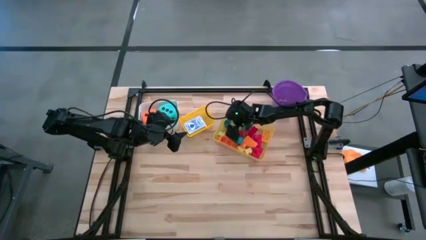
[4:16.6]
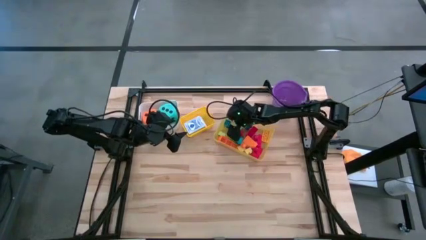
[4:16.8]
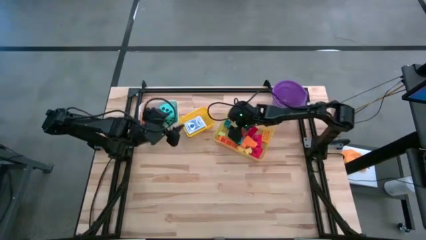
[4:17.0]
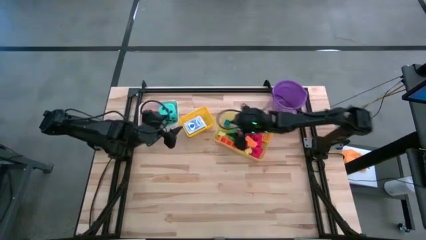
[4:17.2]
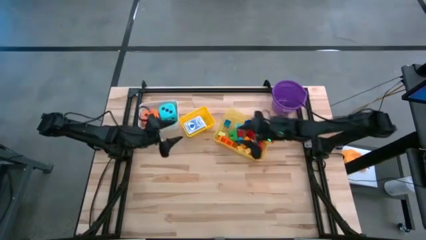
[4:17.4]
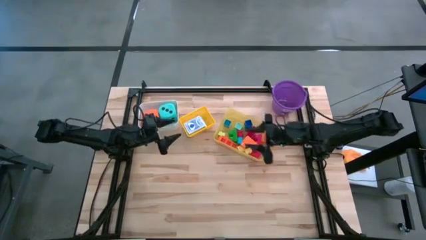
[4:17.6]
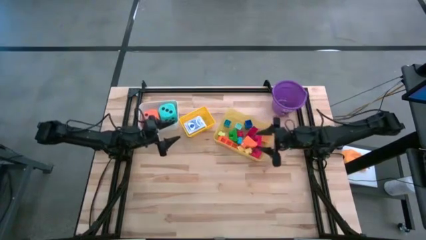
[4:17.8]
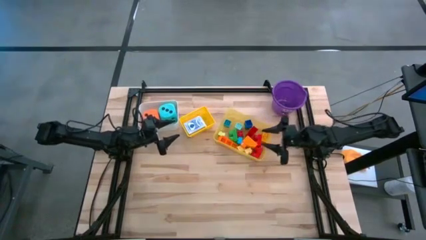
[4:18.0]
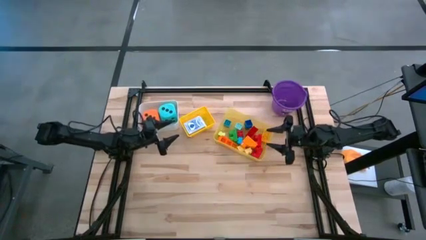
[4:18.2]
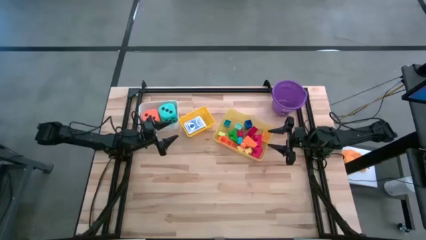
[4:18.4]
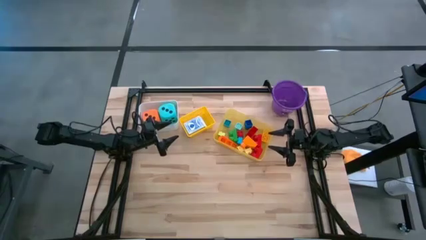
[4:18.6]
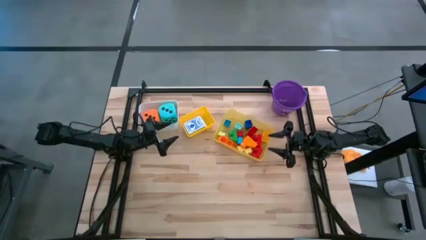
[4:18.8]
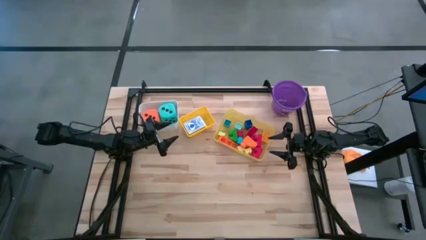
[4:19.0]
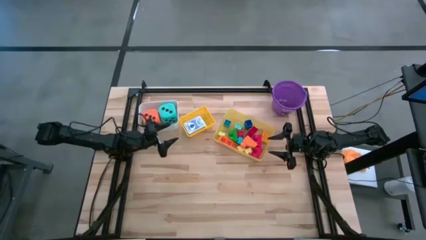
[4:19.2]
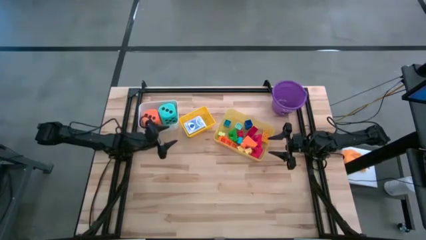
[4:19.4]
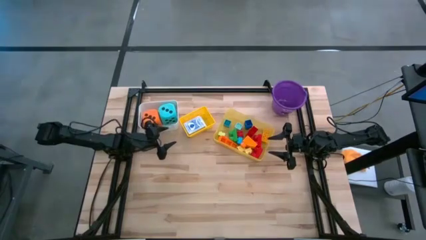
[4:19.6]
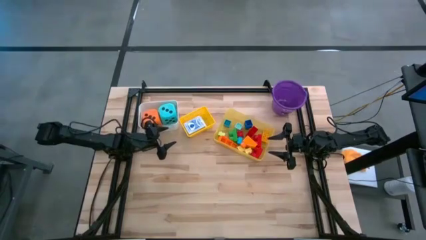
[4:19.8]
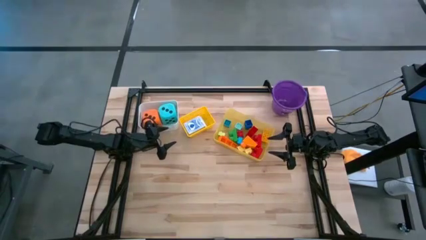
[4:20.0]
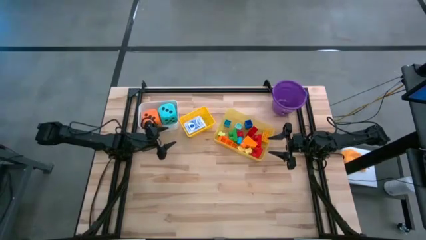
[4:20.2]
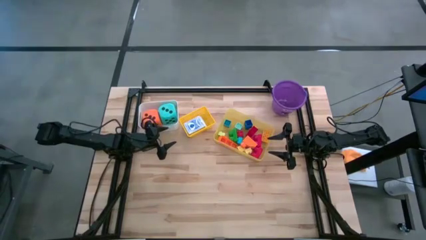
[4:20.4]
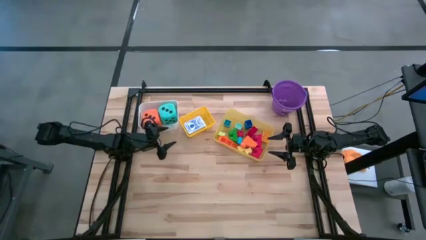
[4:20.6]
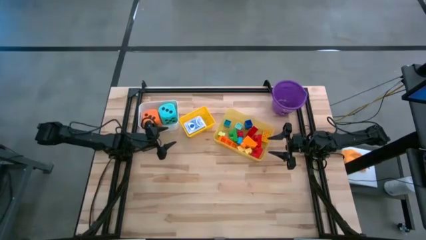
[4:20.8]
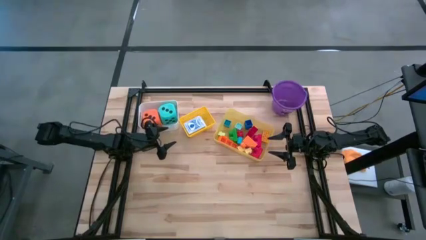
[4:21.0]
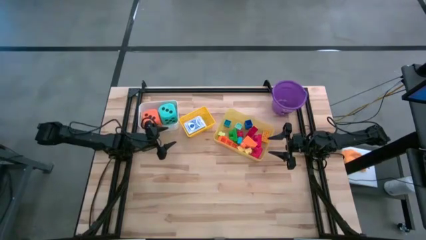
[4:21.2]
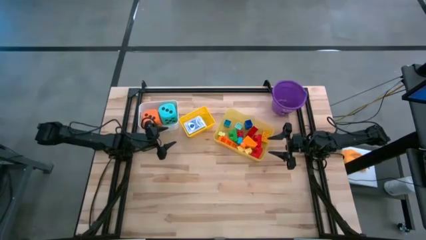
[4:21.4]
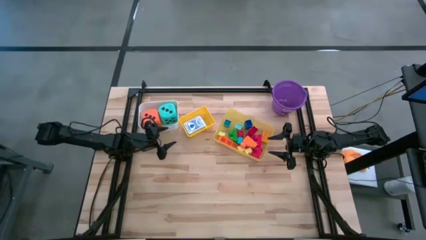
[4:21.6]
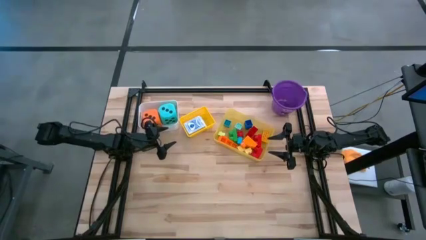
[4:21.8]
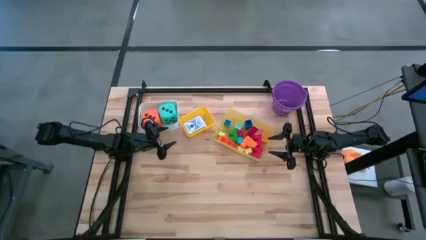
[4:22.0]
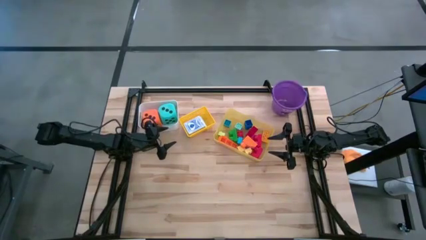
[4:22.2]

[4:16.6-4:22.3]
Task: Pick & Place Toys
Return to Home Position

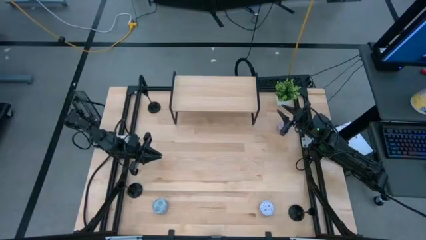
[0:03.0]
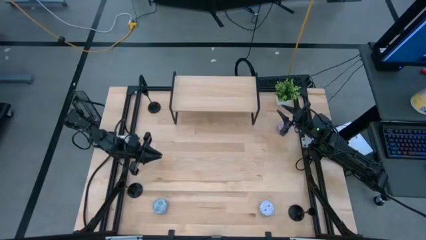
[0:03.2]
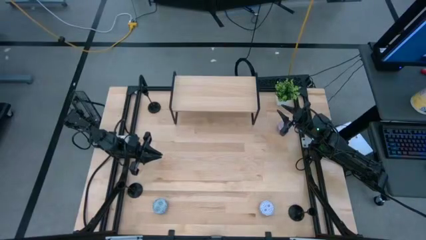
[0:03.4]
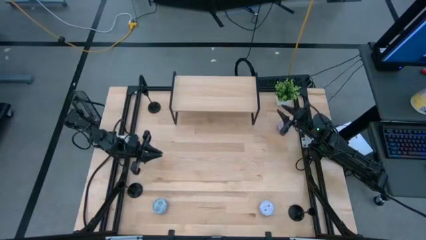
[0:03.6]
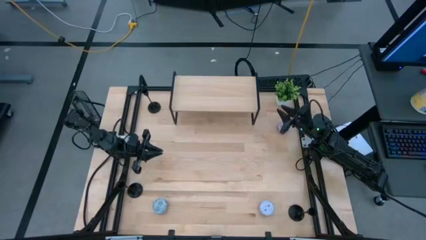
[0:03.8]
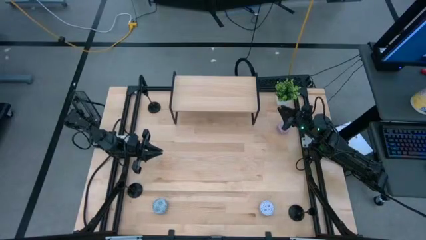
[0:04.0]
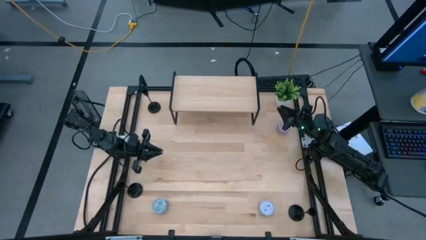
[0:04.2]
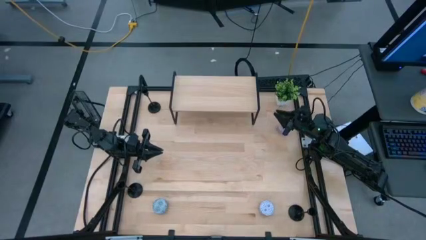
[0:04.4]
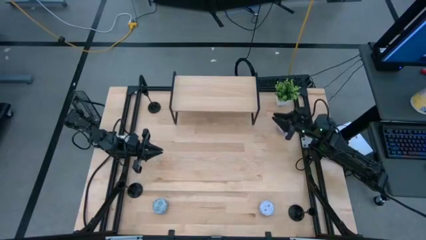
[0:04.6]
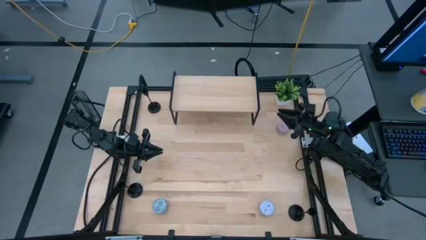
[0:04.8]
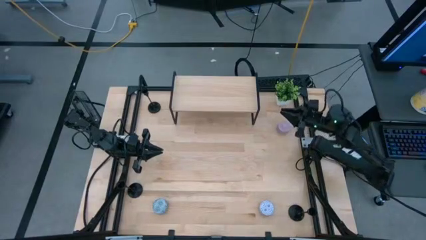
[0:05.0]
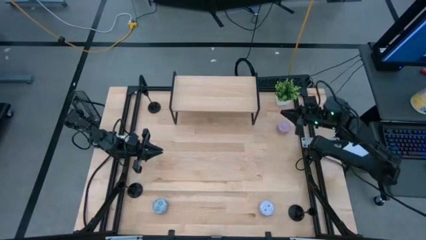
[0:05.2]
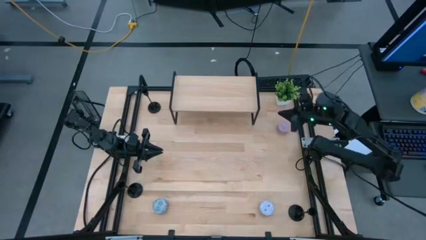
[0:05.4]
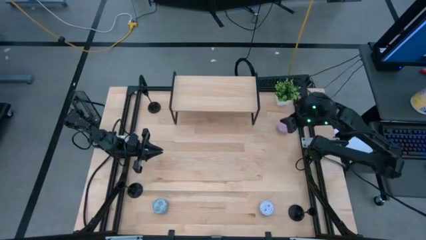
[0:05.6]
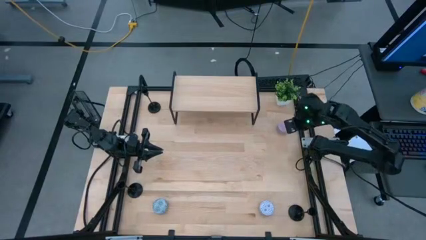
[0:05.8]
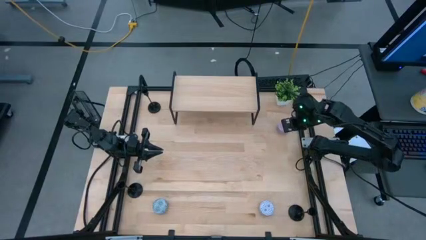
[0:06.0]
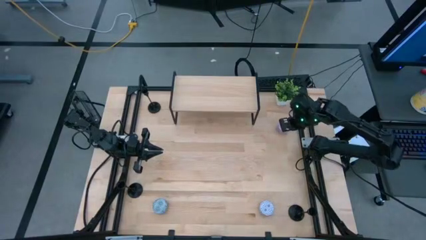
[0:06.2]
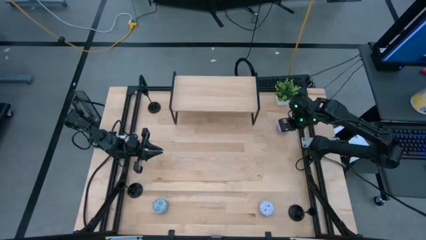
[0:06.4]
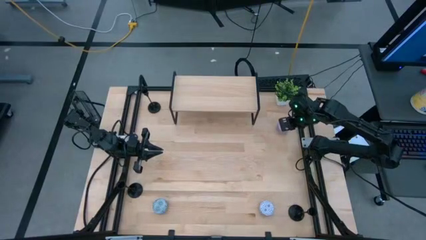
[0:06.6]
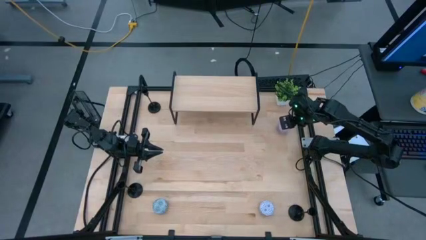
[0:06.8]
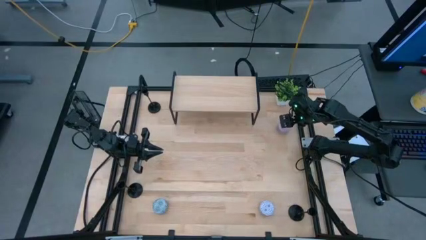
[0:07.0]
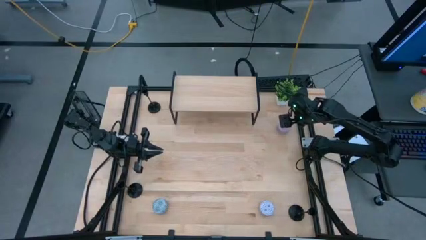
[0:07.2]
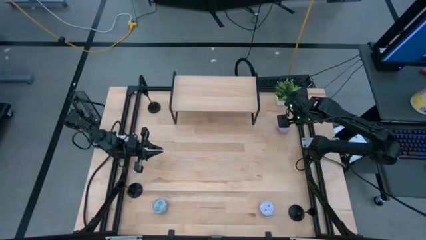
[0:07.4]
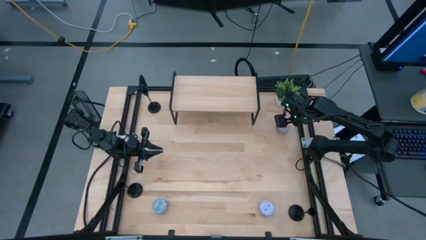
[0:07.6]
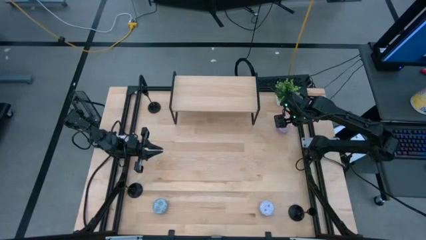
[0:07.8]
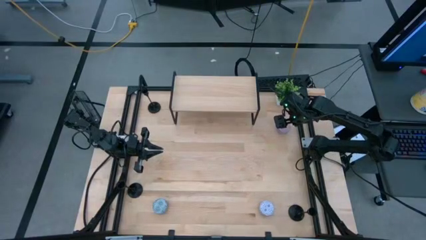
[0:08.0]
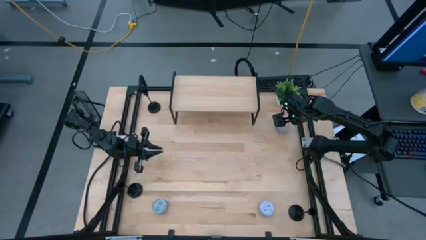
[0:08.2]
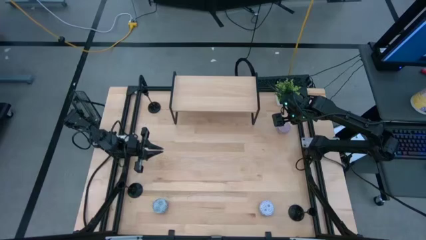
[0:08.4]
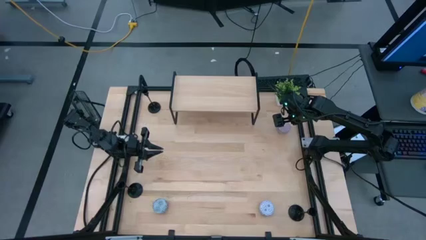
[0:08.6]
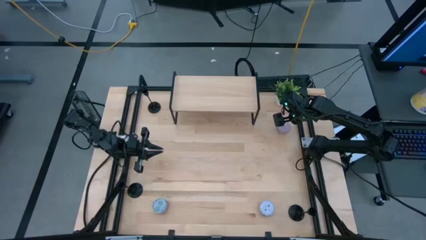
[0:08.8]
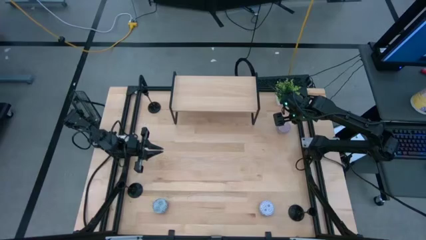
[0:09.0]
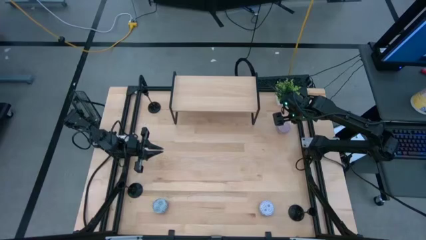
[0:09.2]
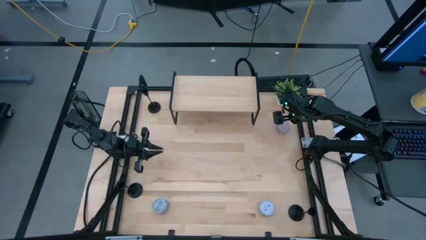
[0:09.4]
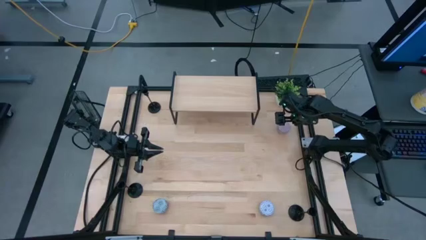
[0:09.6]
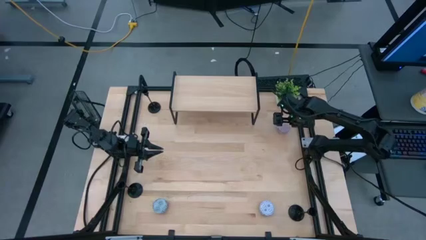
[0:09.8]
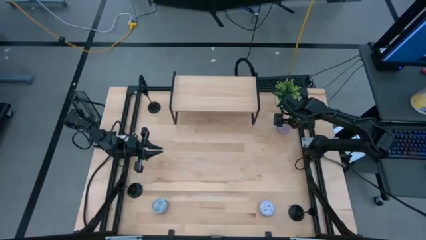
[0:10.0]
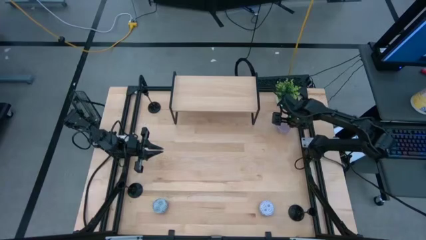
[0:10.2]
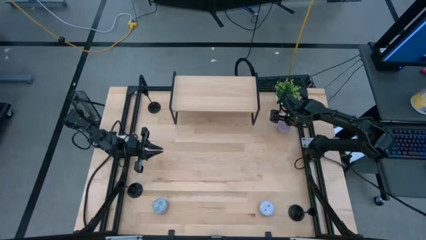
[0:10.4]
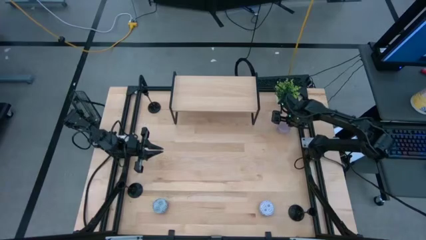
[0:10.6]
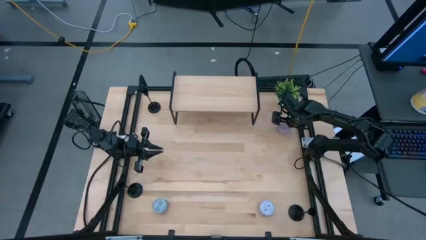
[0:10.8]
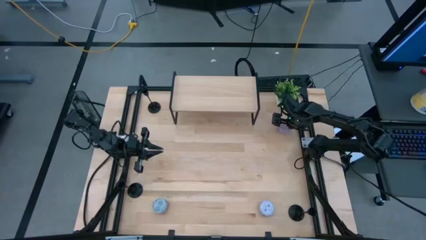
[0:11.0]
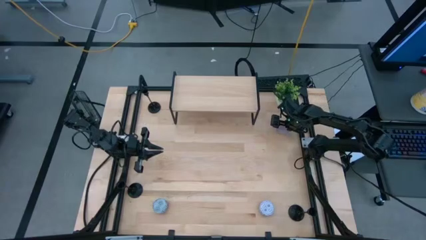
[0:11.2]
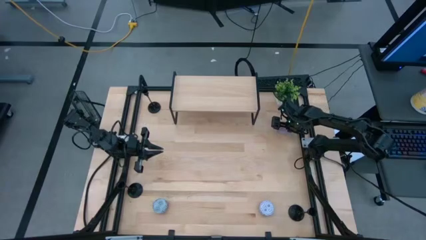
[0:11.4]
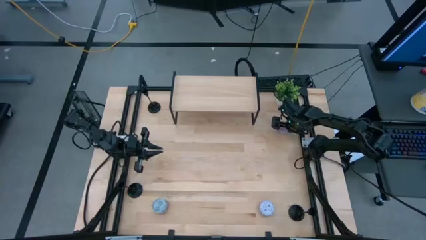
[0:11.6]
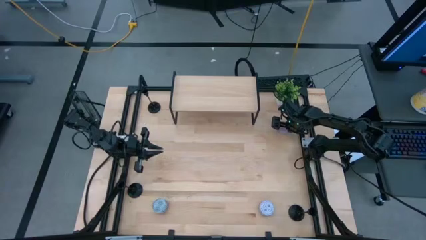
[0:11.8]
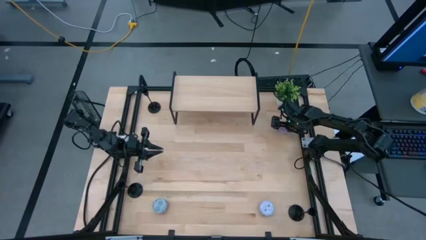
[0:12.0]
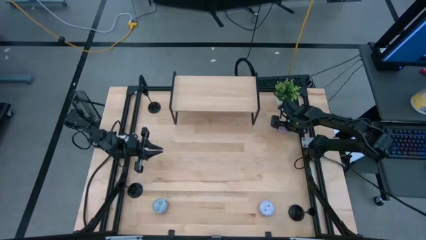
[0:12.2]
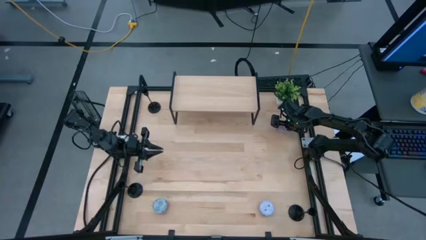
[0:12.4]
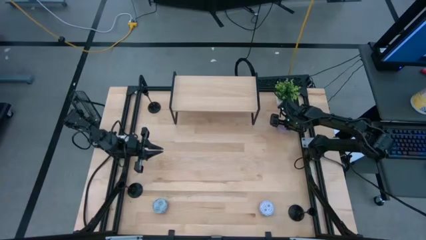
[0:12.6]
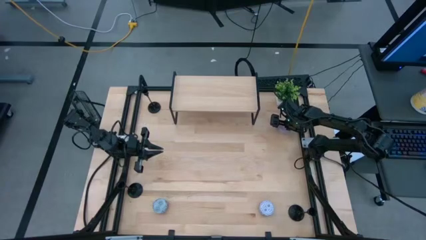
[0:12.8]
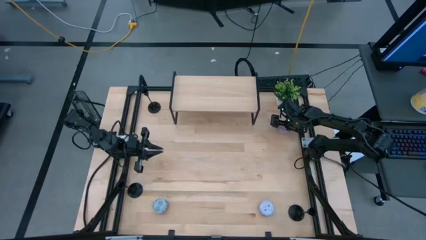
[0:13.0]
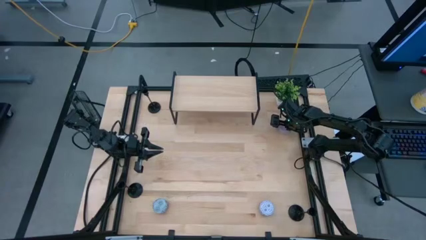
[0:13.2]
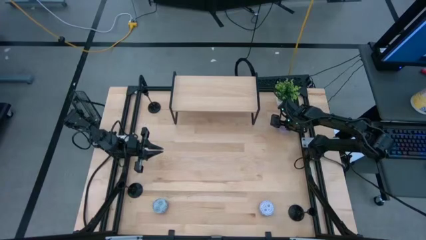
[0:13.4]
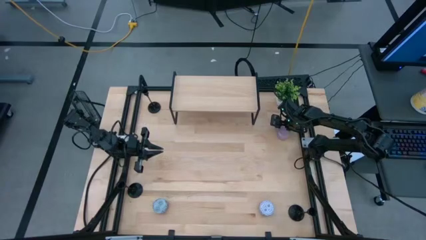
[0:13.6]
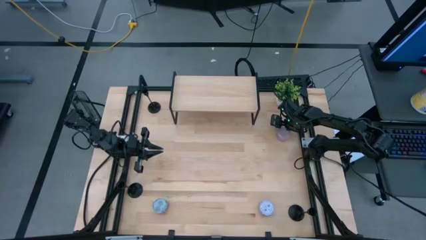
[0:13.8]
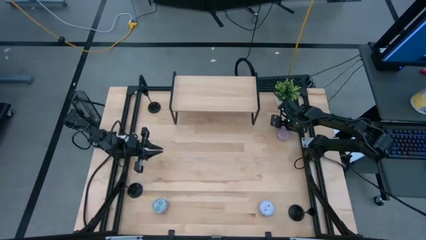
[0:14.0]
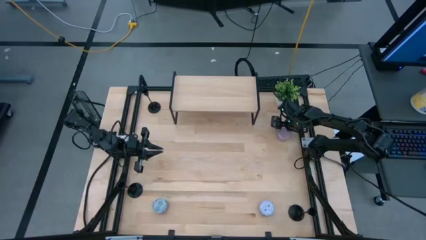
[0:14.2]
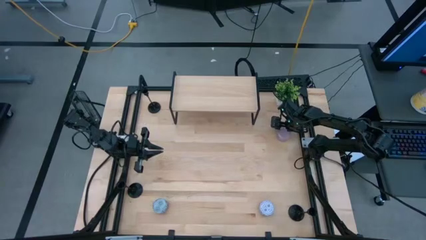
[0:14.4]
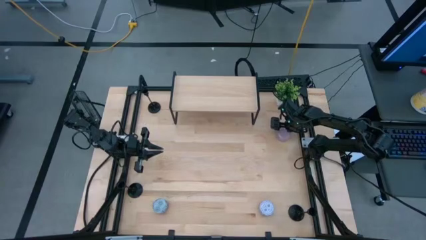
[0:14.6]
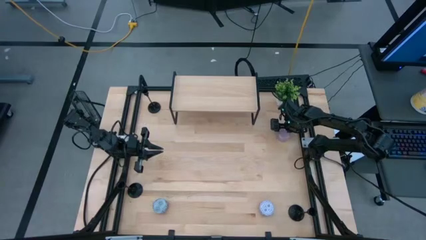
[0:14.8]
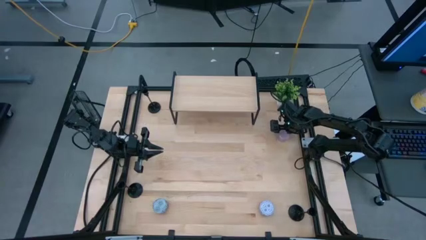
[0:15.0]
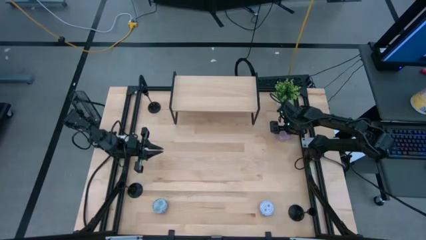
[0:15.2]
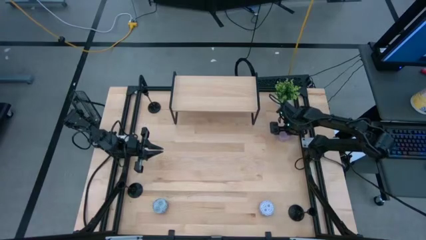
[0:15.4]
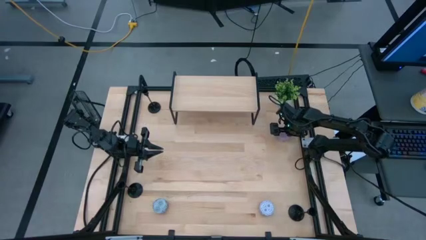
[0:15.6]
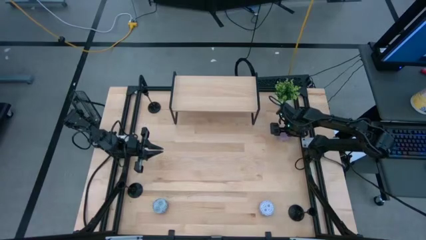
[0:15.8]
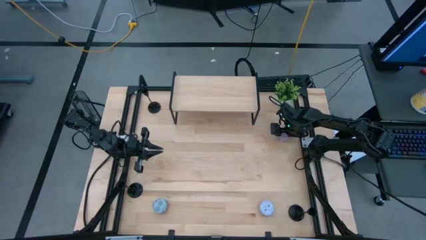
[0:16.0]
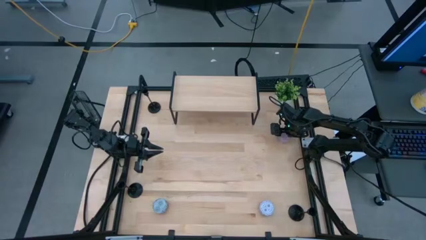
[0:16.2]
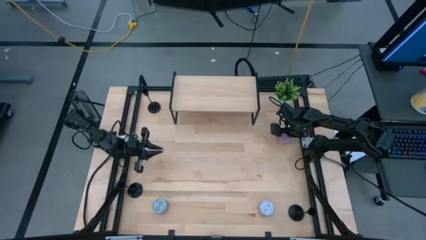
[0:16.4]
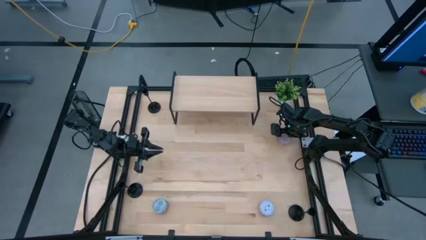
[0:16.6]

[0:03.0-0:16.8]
Task: Pick & Place candle stick holders
Put the purple scented candle on the shelf
